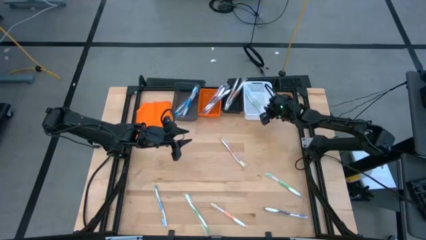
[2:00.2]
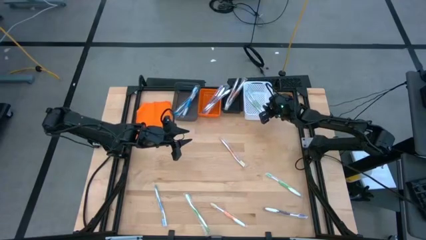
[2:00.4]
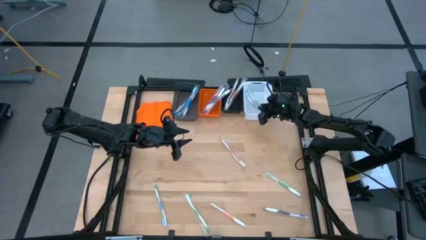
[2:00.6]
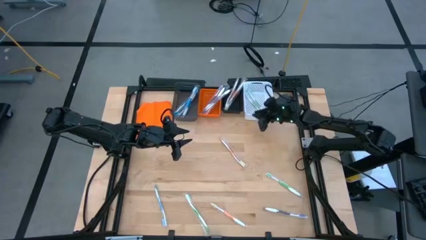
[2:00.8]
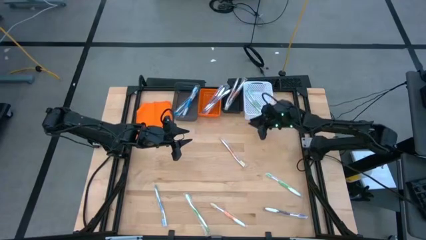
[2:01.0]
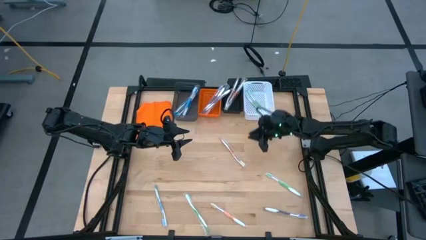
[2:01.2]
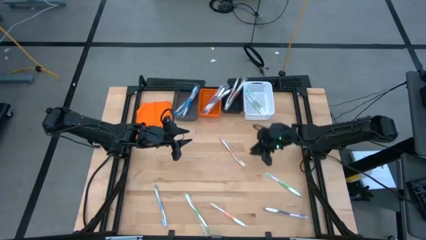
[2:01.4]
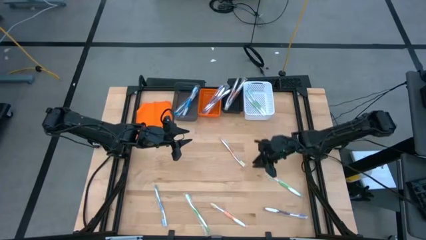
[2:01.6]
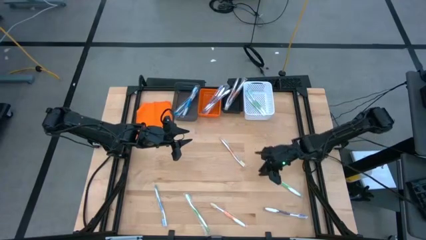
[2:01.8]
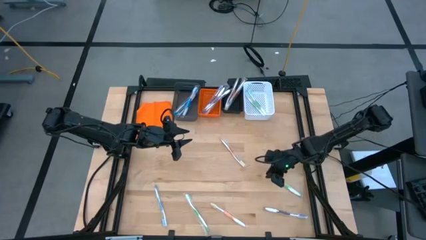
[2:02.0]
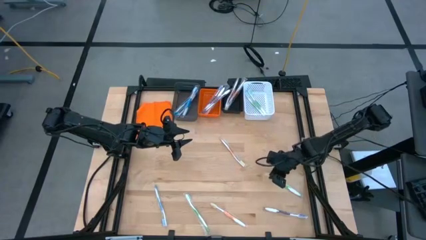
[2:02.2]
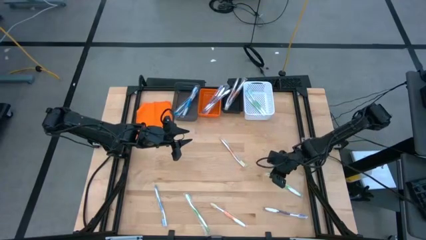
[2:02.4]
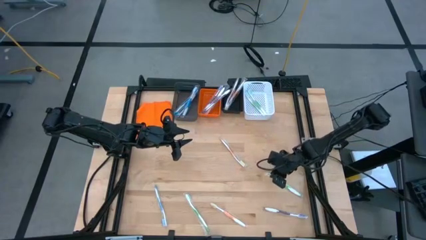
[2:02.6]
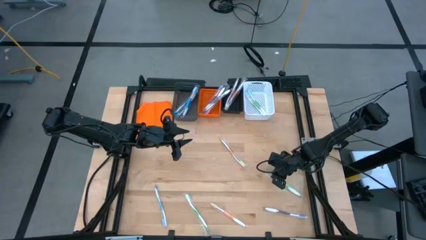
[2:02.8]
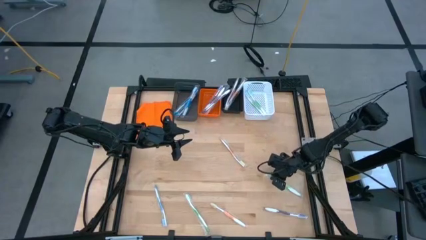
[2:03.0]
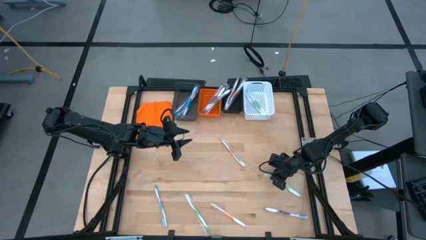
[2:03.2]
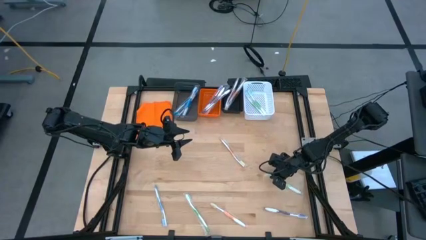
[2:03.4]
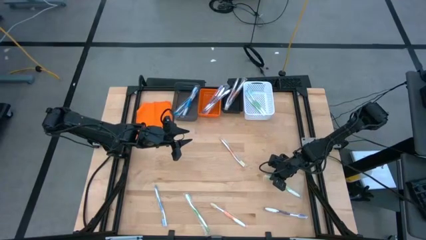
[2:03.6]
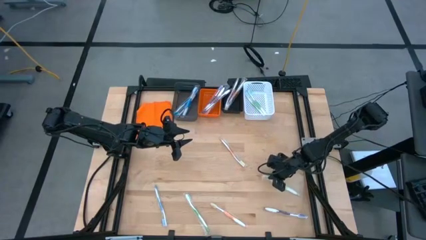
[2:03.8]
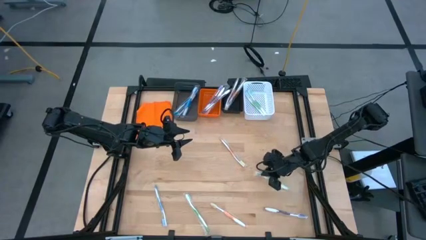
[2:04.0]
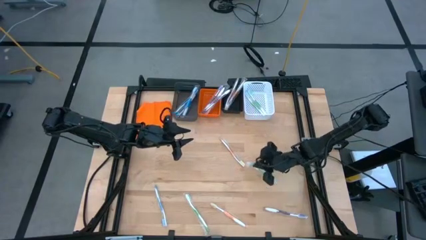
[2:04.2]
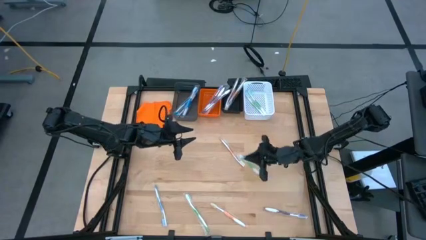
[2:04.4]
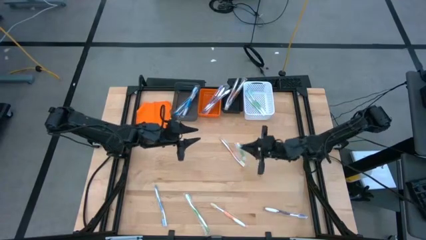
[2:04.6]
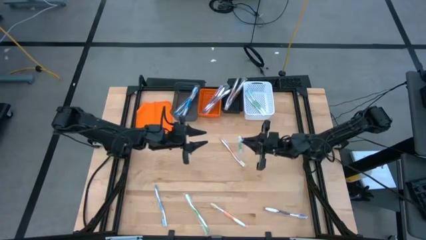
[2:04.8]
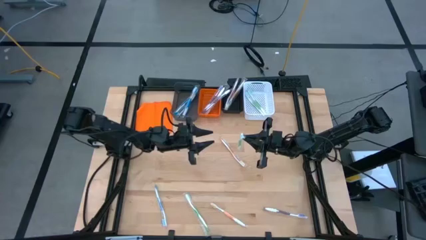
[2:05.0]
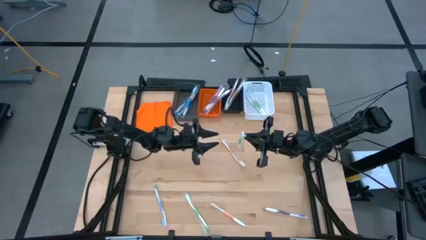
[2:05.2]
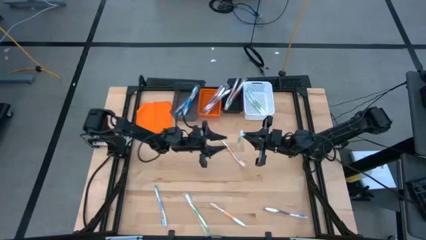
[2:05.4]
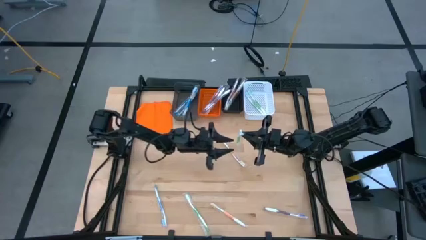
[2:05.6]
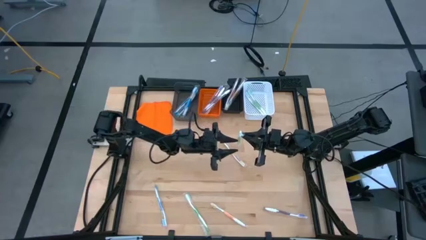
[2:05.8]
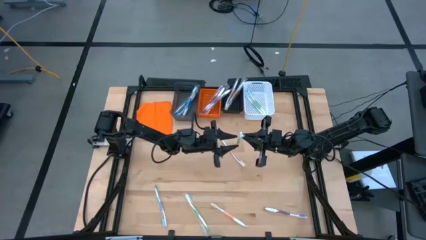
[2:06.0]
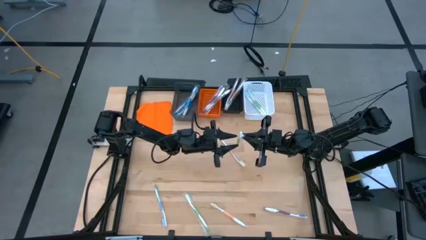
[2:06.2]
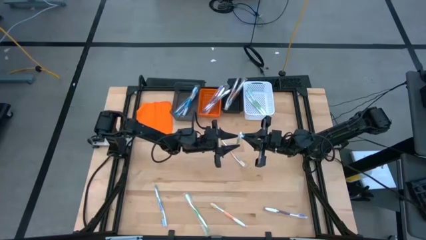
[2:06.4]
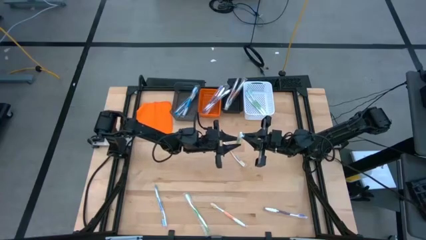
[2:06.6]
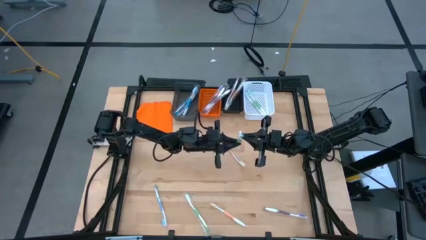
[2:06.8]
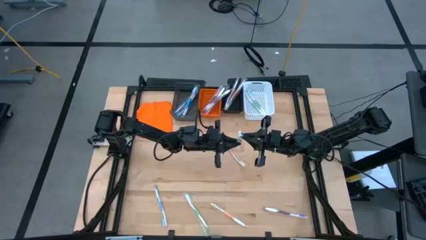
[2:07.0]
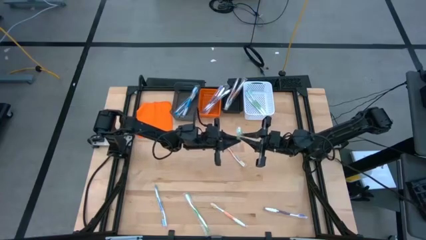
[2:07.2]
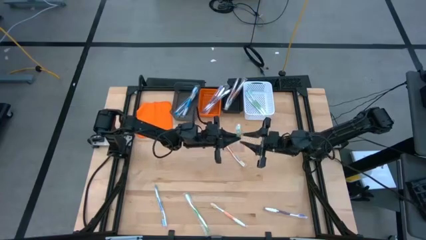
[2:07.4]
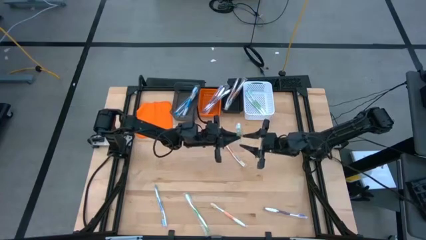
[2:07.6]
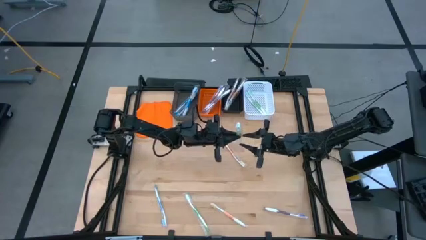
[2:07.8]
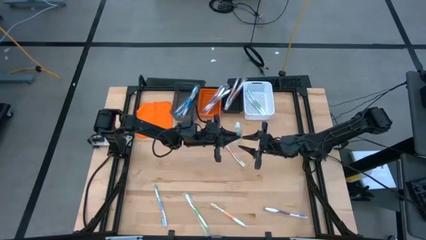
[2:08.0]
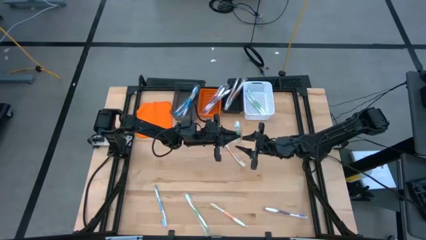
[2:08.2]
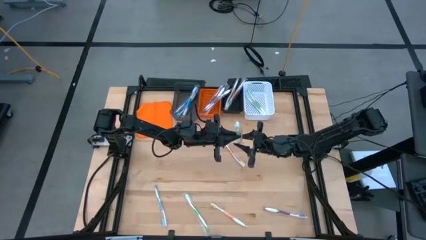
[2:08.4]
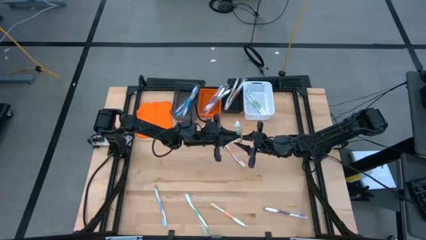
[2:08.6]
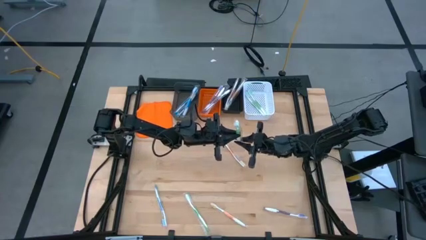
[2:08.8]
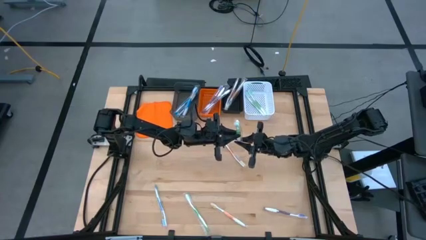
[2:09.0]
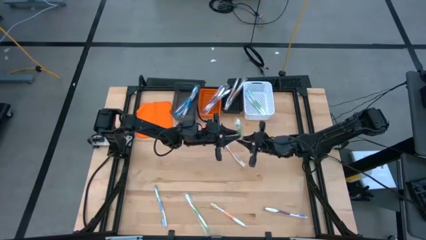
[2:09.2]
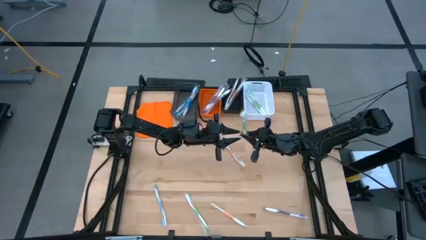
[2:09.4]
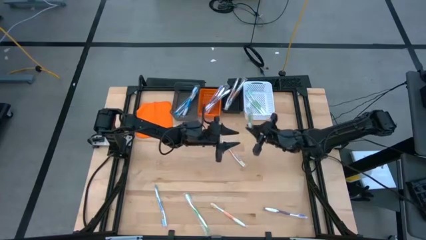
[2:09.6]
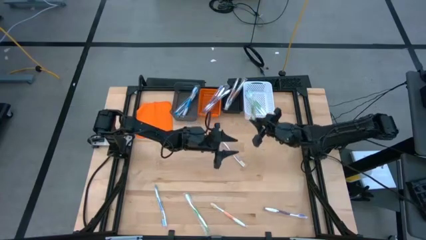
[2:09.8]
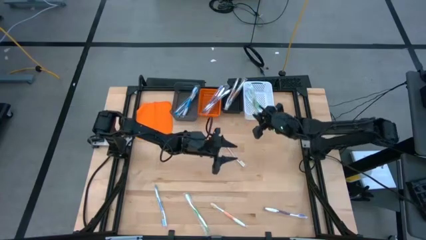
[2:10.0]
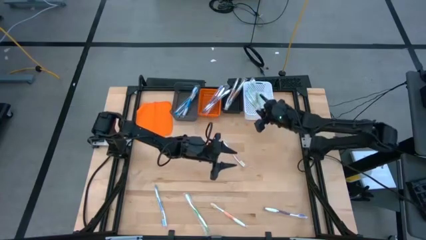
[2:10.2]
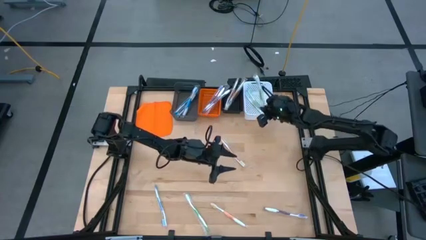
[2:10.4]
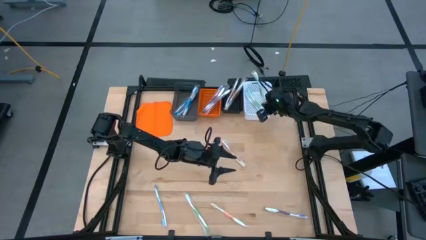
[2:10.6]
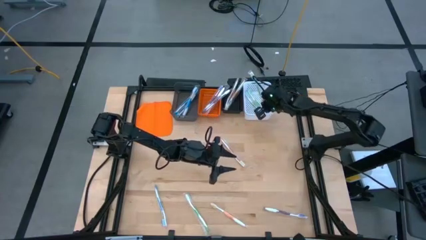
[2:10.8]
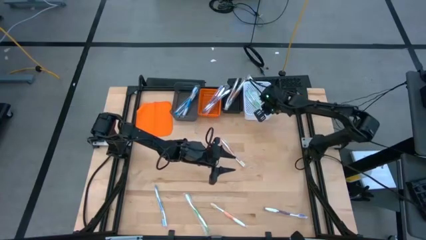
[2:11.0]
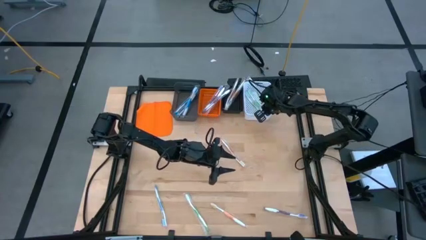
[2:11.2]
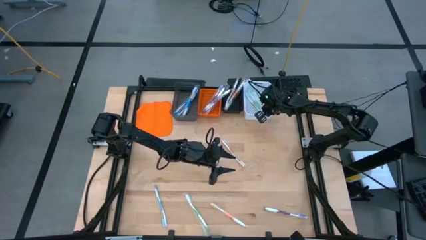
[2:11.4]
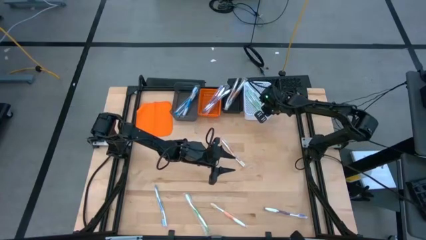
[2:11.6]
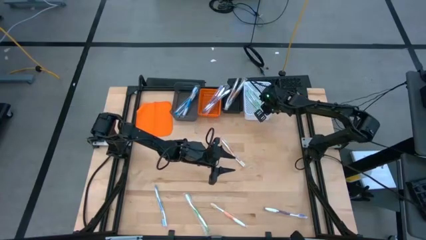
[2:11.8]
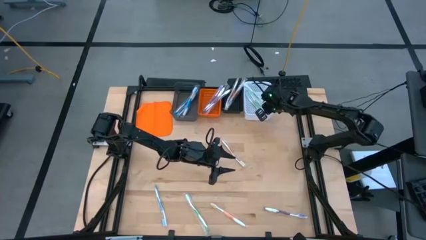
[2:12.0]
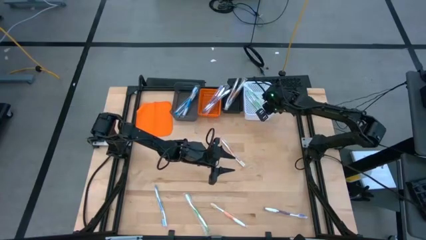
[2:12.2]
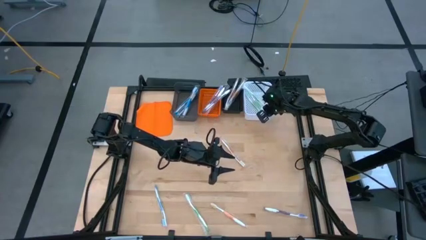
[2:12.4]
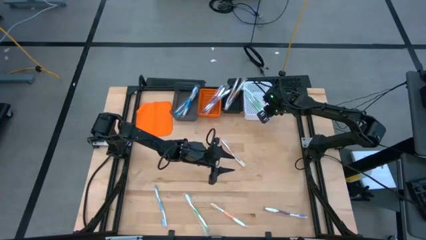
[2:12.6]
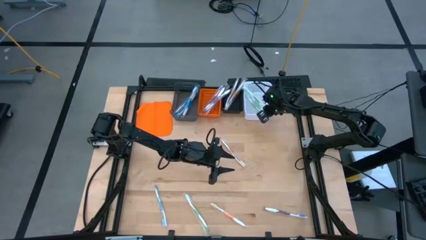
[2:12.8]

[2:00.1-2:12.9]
Task: Pick & Place Toothbrushes
Put the green toothbrush into the white bin

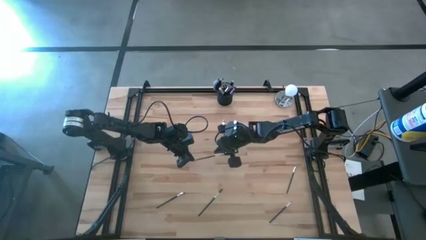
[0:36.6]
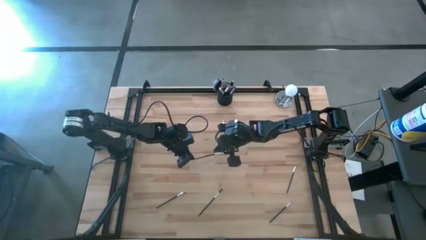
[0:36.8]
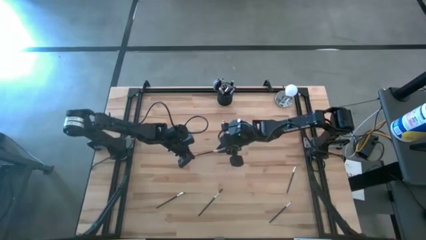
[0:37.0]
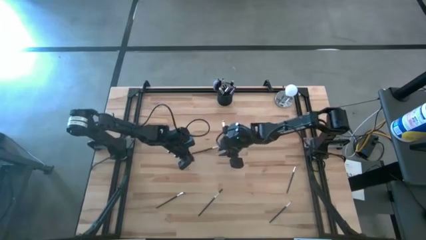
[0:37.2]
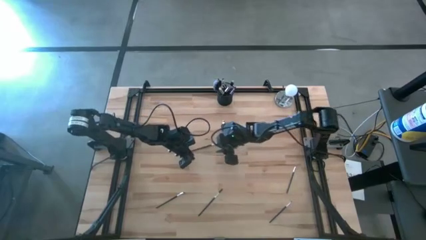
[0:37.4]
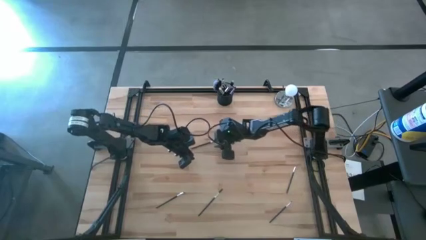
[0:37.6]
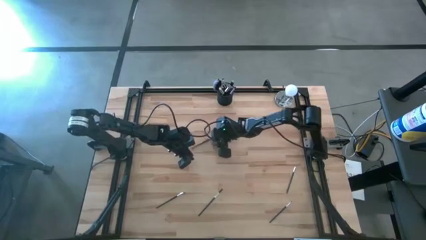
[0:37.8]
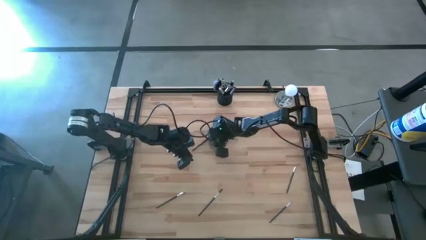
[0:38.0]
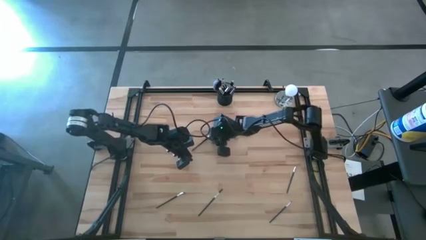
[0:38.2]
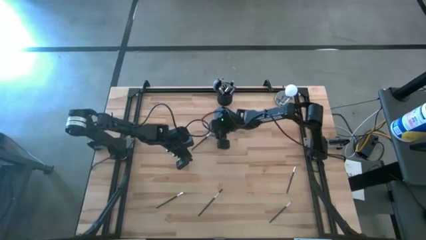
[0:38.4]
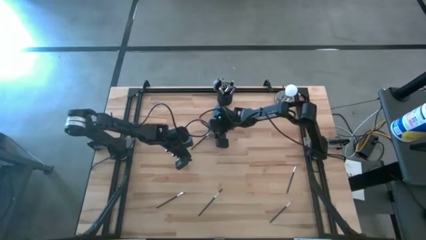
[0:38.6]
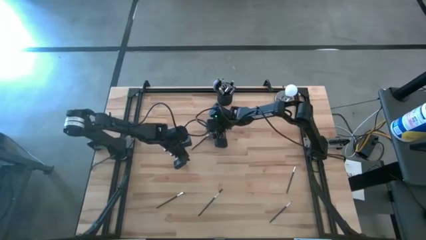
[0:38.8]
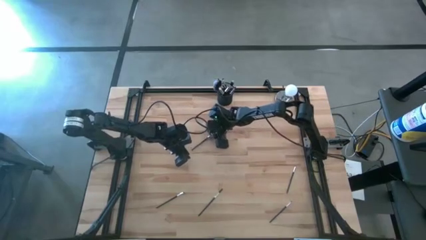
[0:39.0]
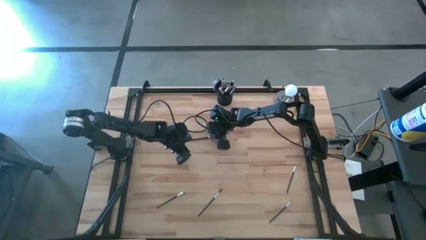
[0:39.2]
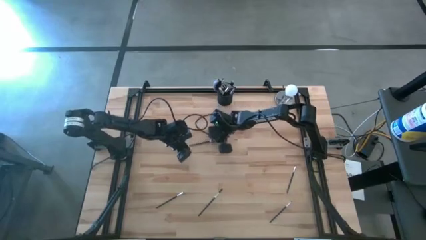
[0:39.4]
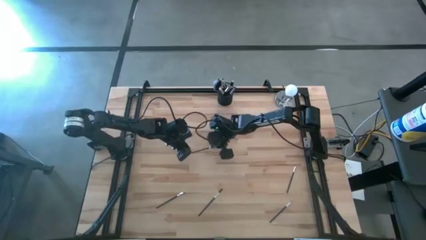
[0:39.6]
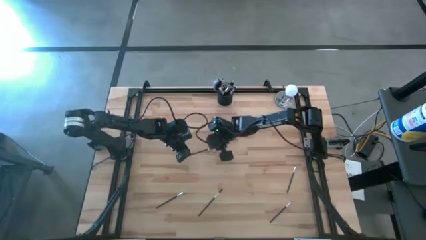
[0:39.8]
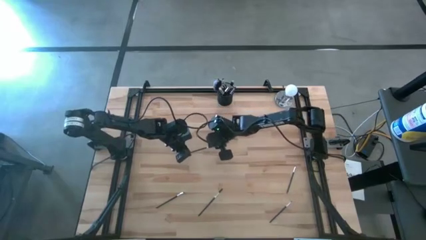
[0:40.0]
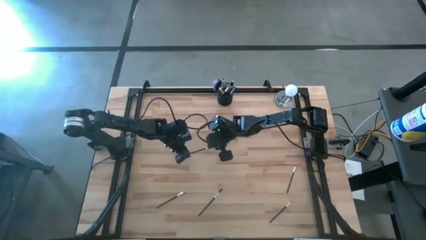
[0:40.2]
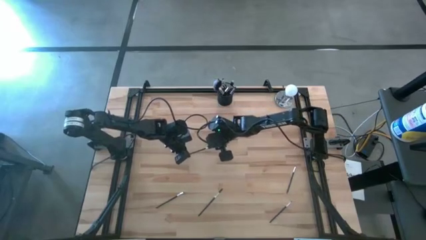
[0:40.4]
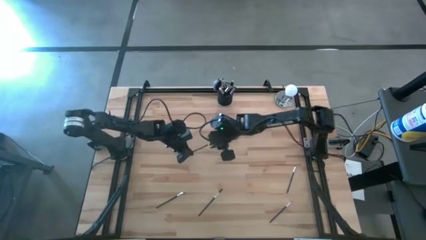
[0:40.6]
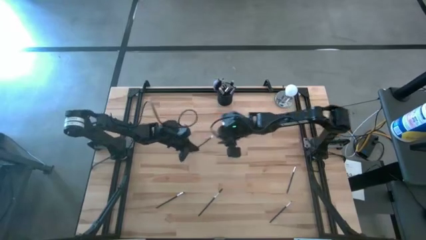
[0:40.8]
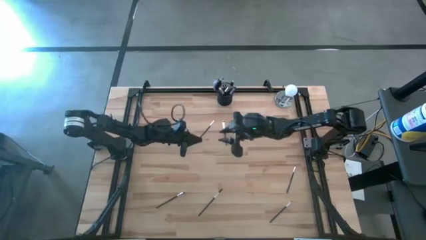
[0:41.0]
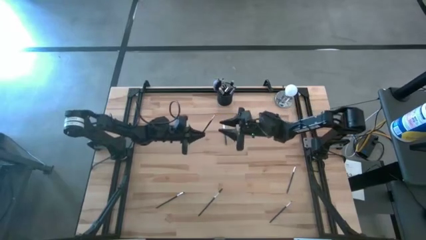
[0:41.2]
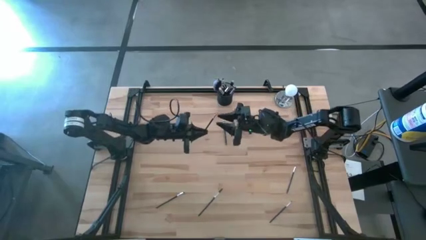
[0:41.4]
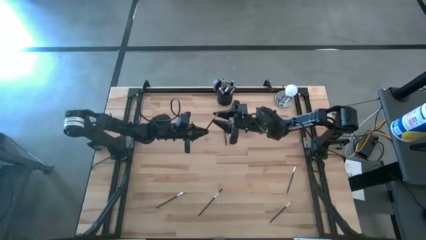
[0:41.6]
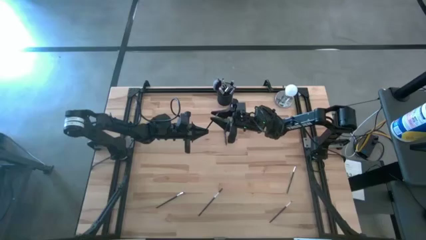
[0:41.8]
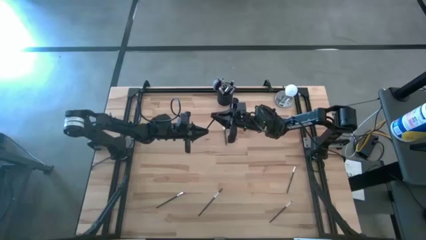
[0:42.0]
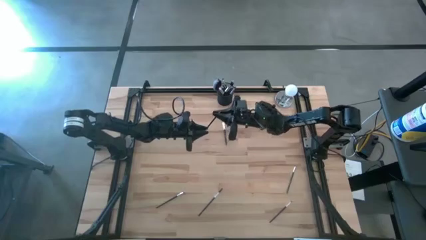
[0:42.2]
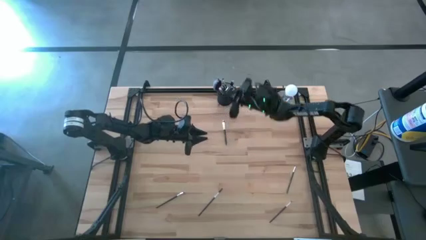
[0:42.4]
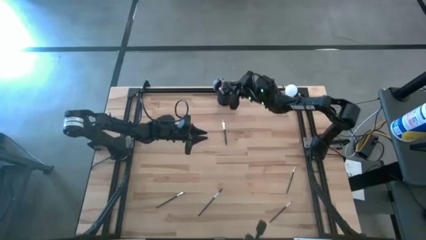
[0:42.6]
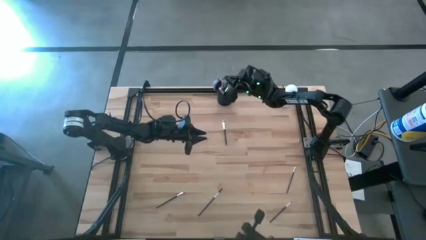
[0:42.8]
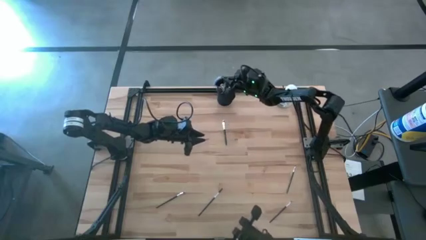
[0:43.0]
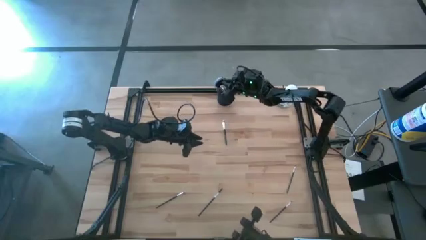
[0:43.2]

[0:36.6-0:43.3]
Task: Put items in baskets/containers
Put the black liner brush into the black pen holder
